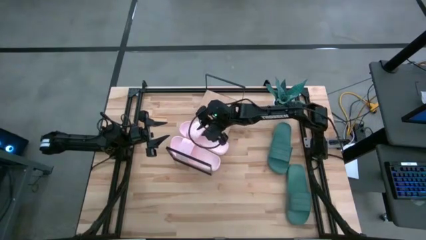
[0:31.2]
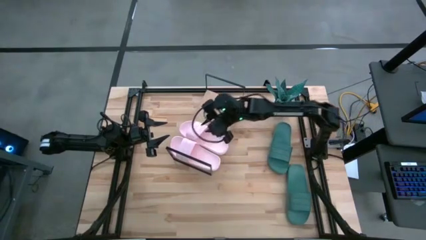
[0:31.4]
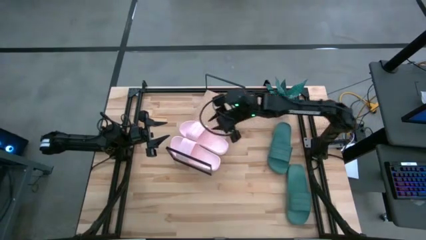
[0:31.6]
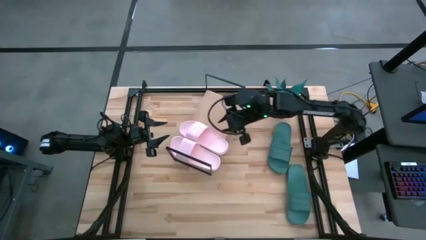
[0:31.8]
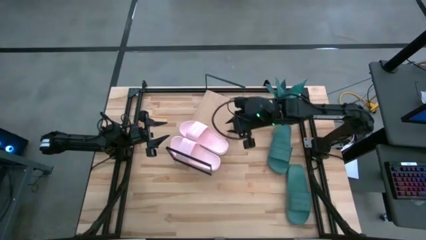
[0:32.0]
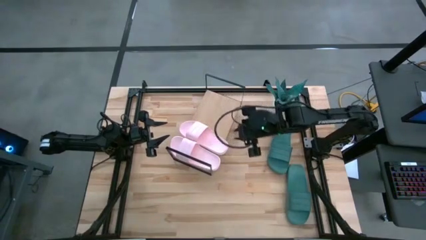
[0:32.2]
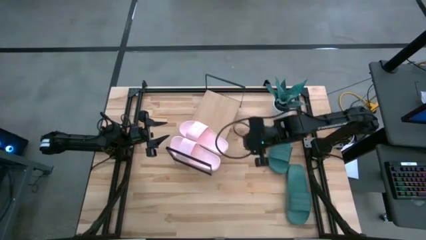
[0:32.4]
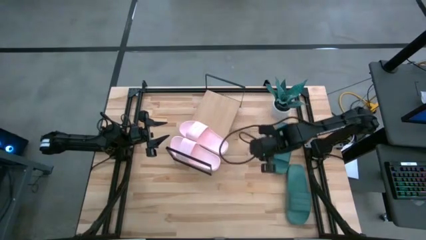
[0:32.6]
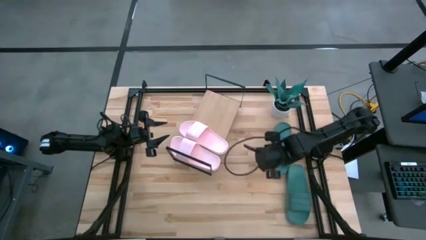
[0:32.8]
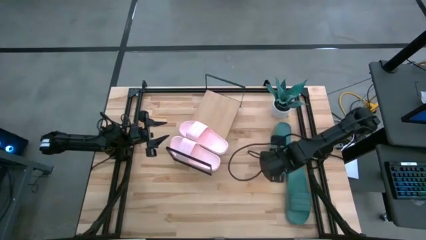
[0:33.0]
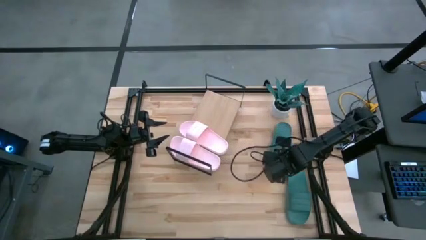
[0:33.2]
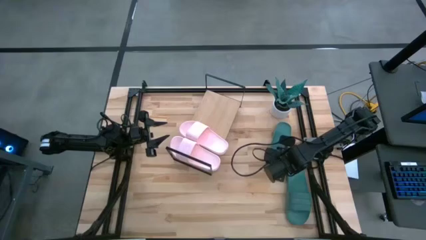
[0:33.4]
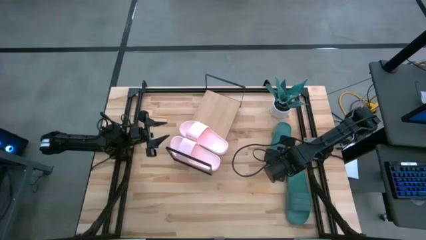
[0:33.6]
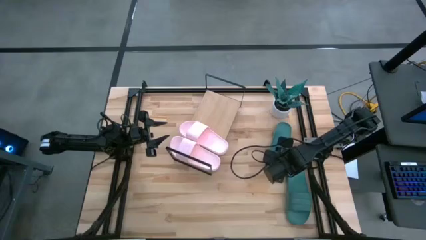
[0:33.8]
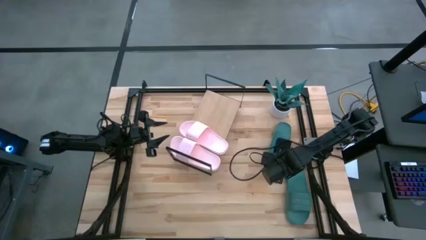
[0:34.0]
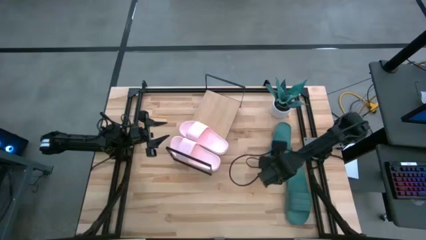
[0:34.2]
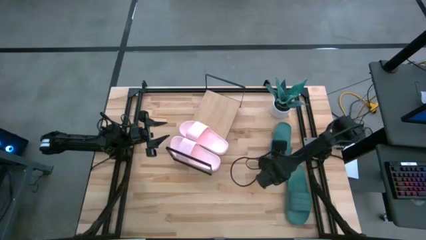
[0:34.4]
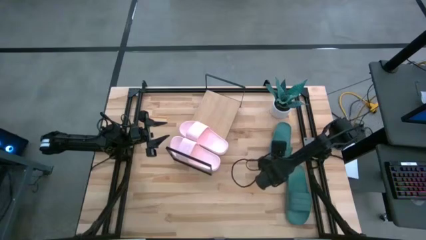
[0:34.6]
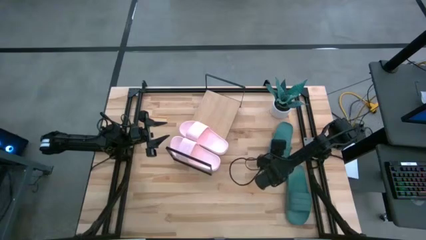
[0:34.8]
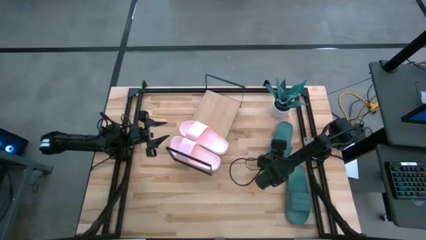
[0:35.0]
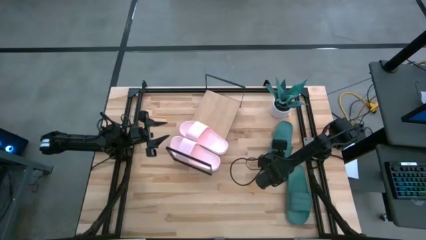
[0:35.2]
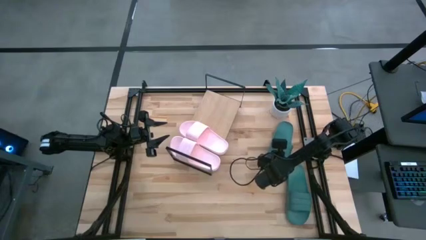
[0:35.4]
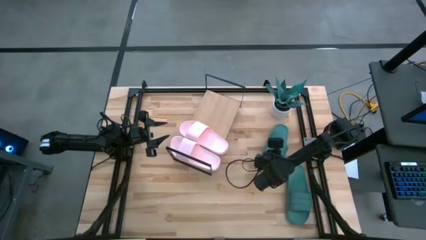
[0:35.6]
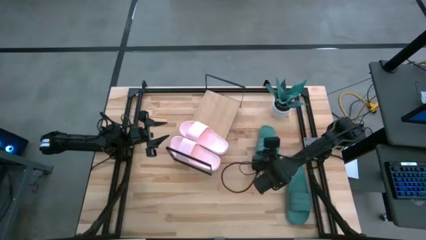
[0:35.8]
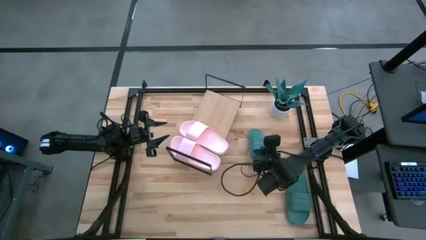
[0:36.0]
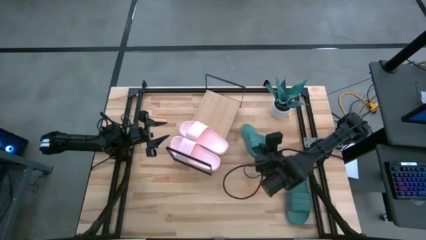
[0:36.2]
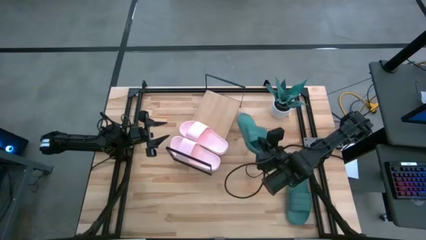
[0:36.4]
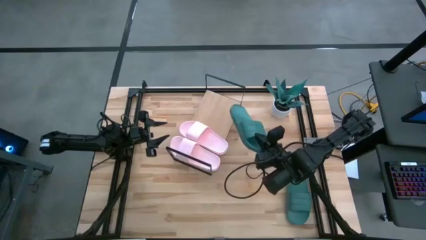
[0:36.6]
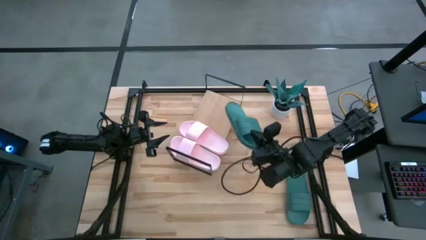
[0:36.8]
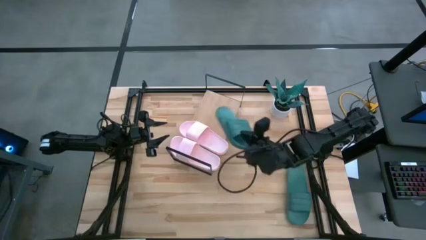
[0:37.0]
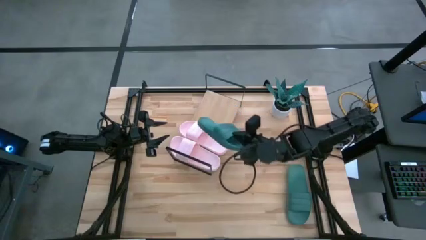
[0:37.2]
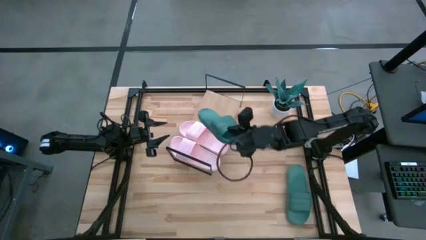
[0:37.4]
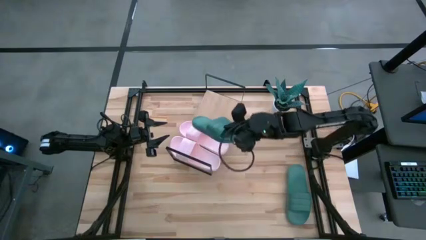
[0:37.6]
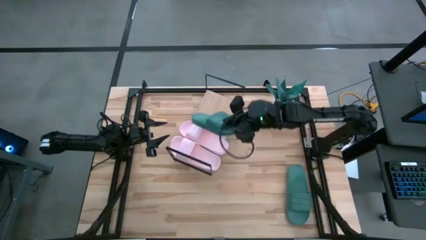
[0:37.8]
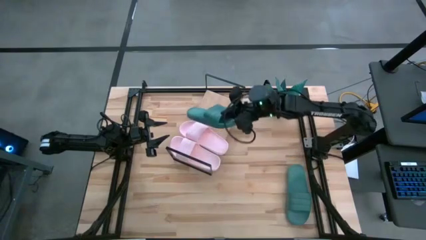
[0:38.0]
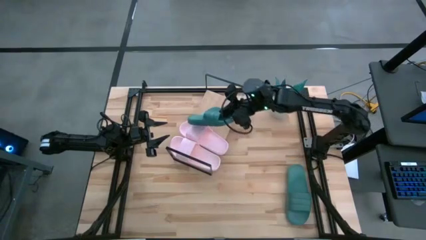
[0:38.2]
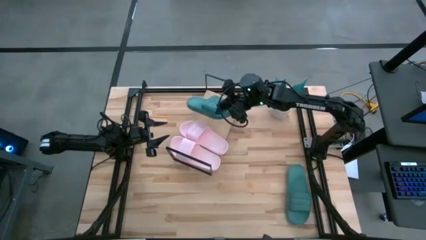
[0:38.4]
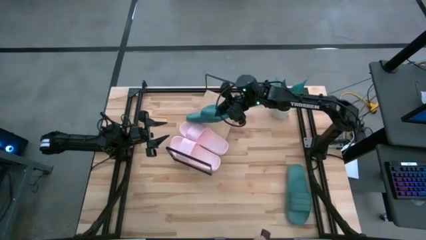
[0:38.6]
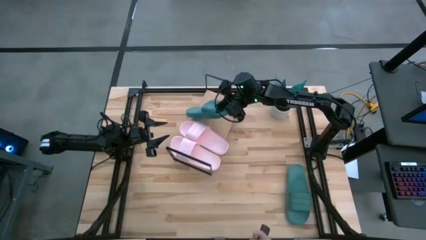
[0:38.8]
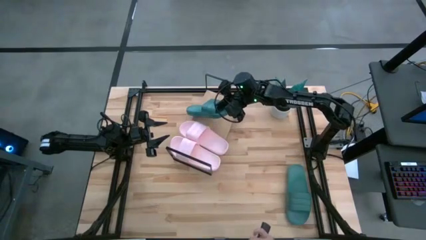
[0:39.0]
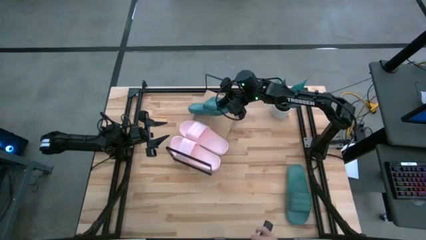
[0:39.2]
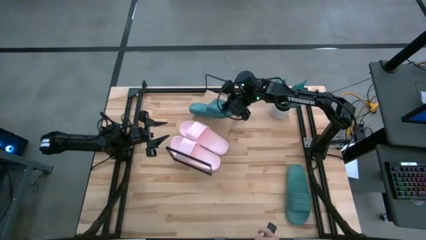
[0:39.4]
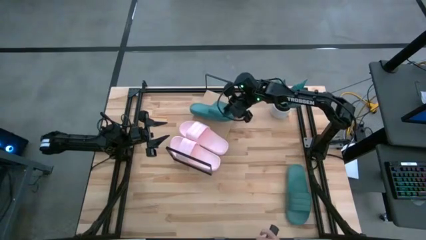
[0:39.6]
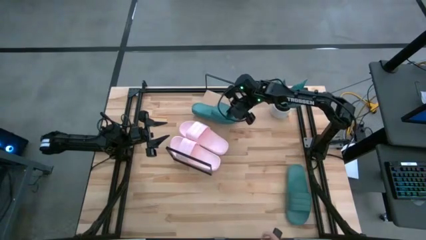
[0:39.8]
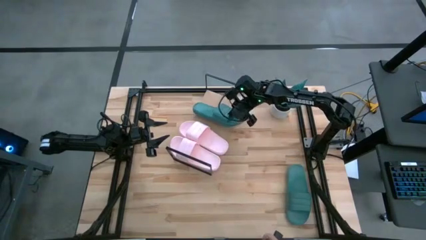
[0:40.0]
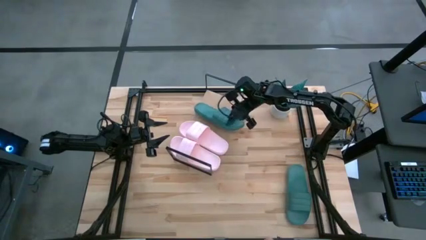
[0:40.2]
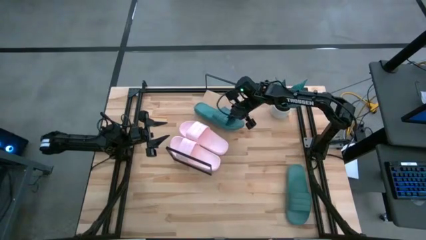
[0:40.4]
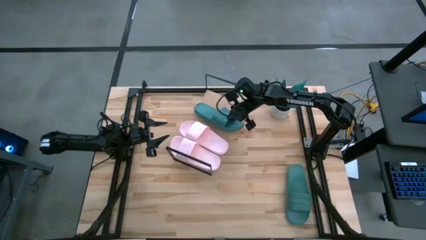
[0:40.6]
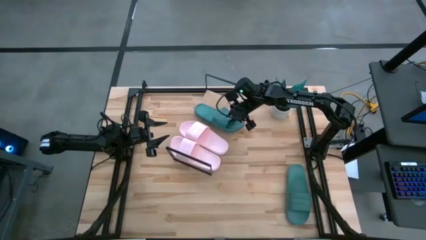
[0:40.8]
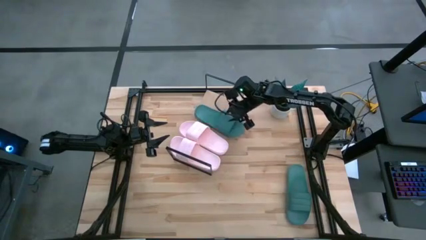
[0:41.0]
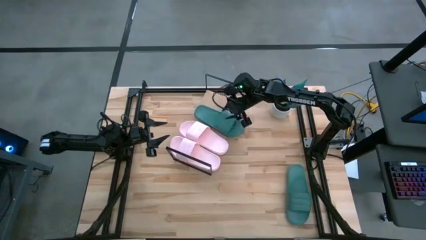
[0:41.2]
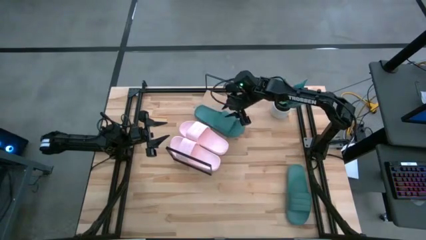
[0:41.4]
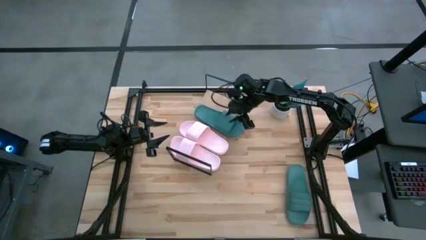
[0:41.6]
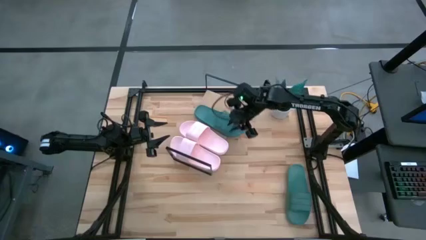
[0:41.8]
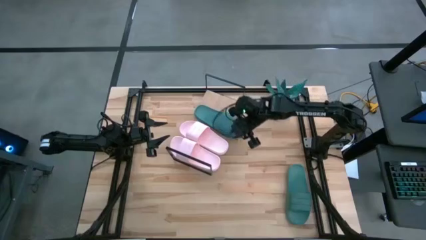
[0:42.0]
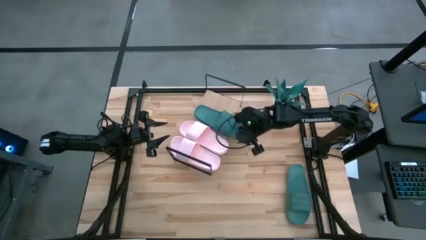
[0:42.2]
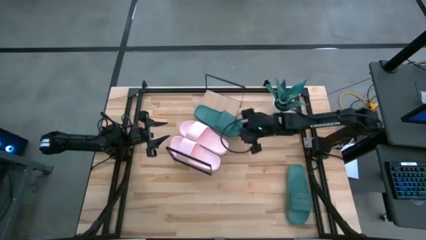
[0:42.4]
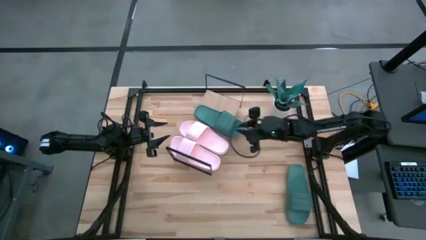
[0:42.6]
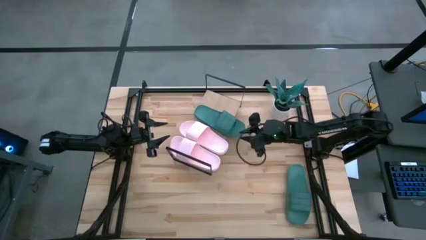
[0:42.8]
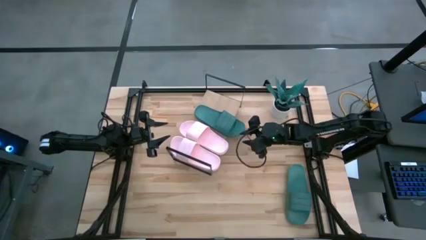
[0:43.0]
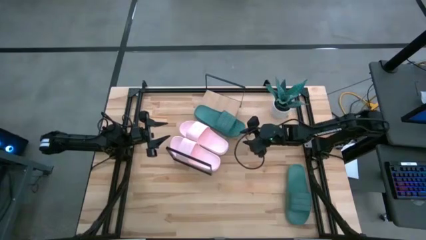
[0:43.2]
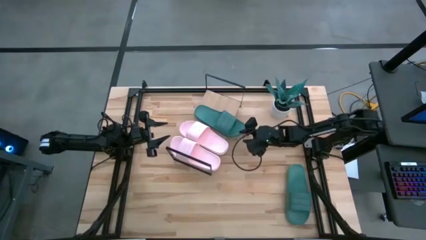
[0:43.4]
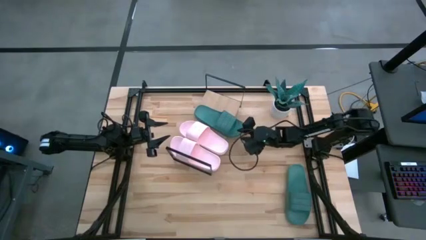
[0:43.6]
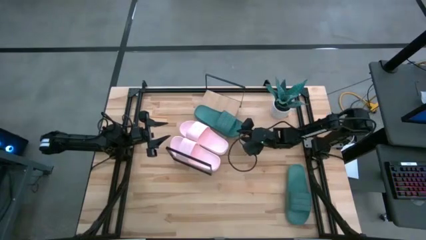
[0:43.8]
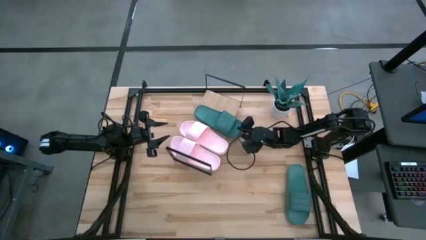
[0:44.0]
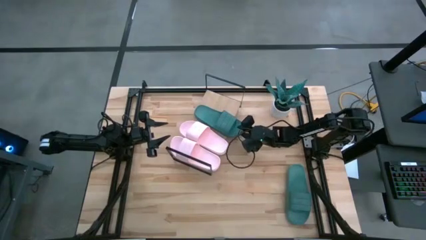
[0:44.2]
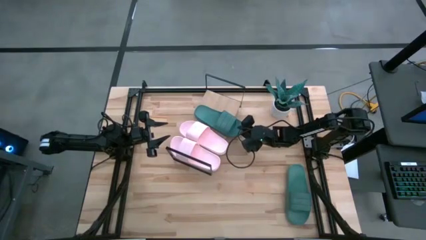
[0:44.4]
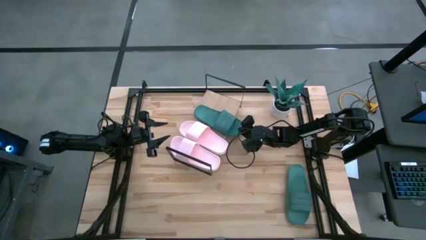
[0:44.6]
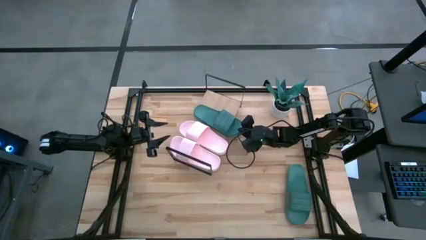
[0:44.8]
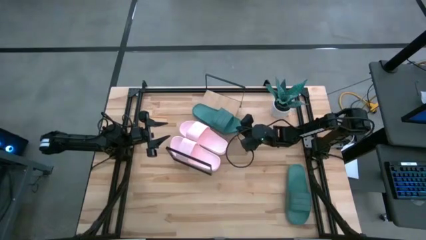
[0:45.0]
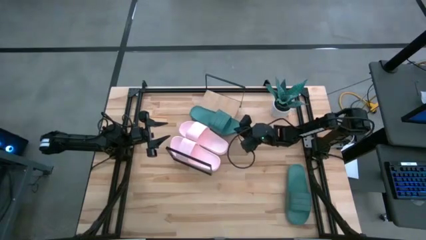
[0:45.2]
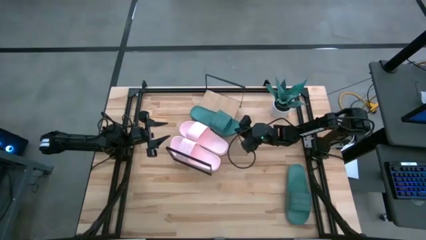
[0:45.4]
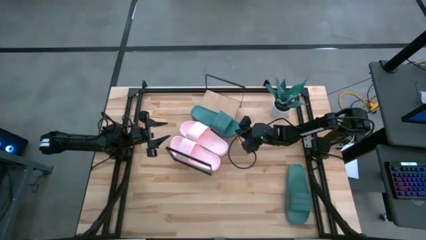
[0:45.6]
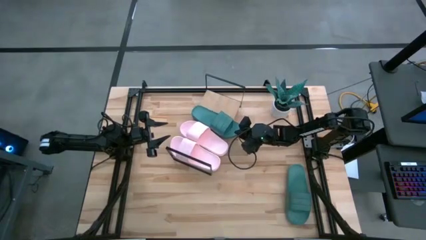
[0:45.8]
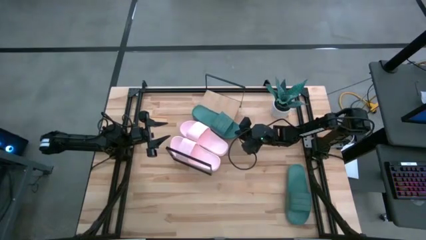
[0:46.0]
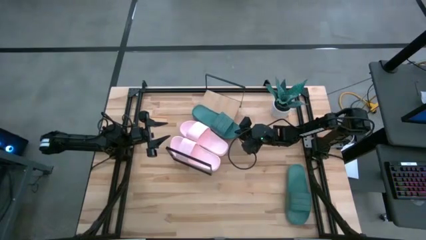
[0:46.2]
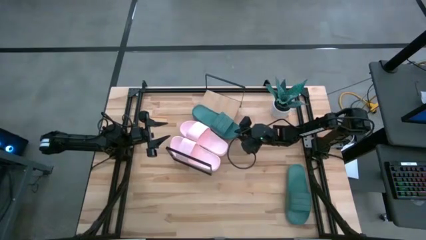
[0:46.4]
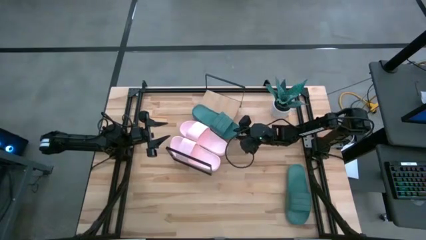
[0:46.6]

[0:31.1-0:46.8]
Task: Pick and place slides into the shelf
Put the top dark green slide on the shelf
